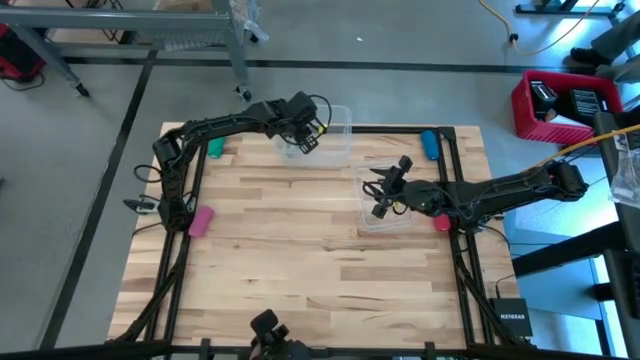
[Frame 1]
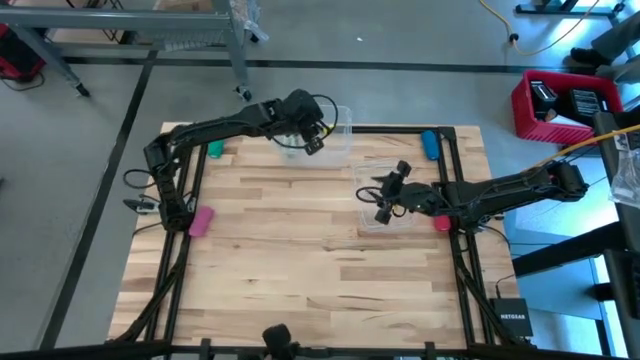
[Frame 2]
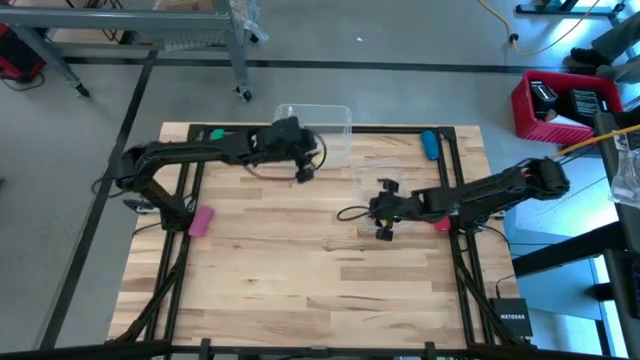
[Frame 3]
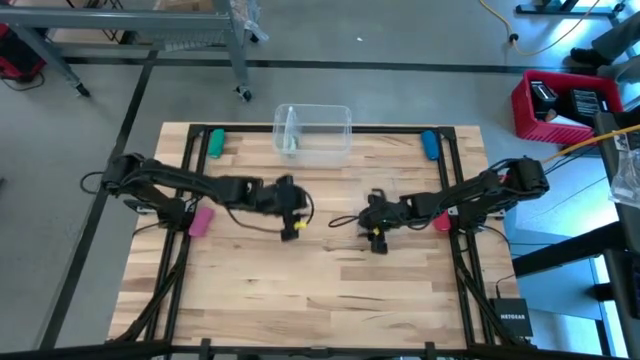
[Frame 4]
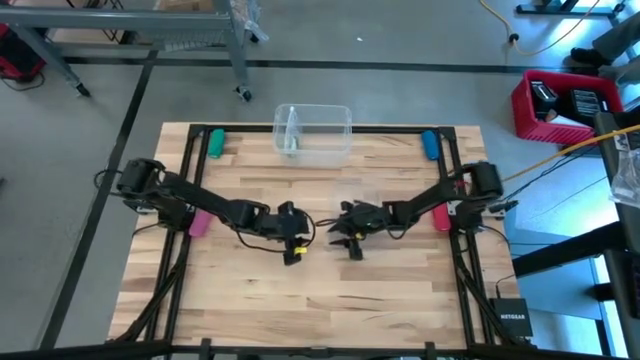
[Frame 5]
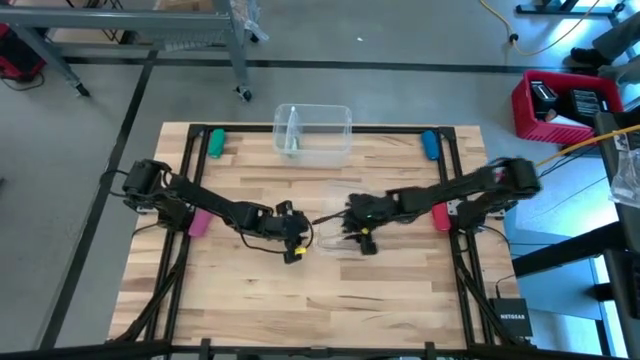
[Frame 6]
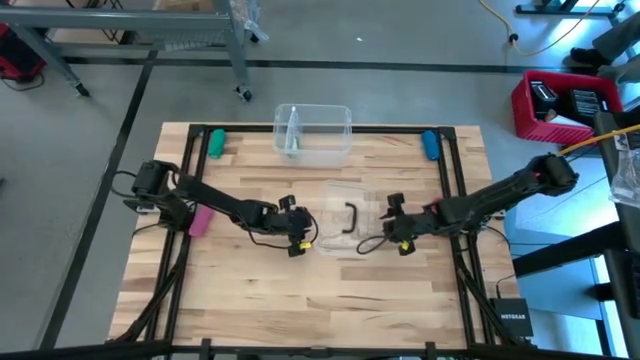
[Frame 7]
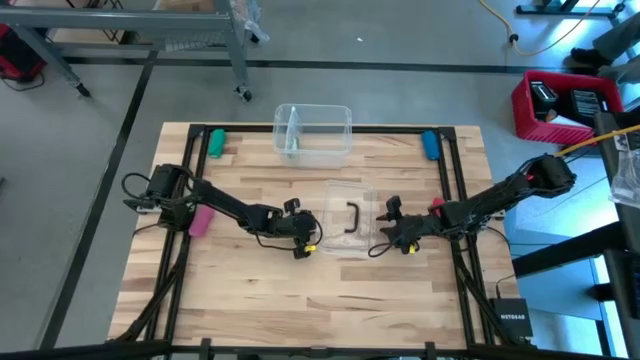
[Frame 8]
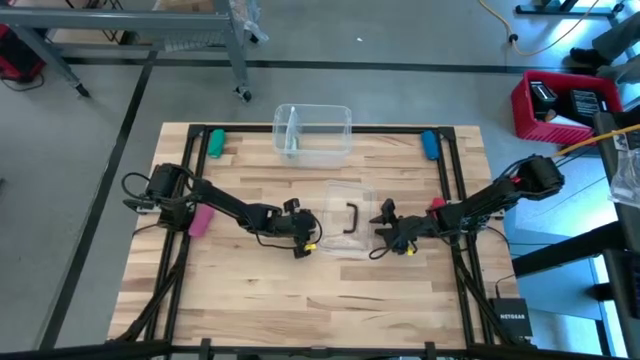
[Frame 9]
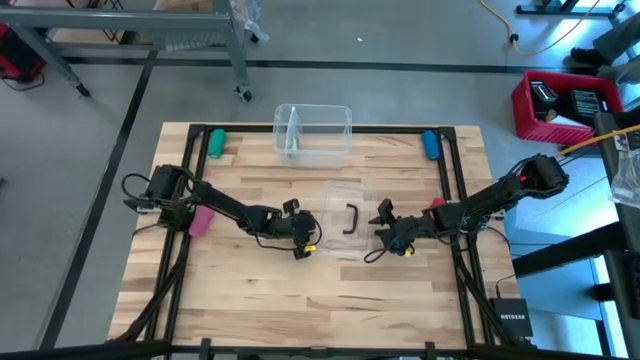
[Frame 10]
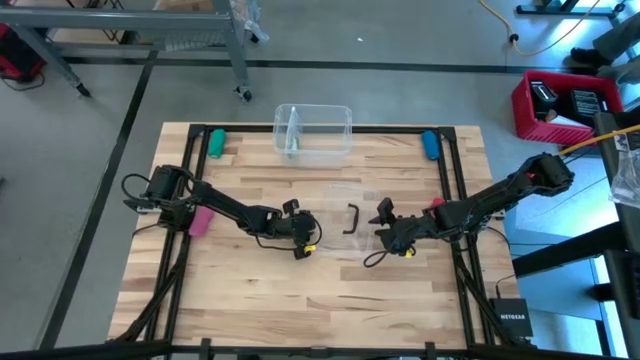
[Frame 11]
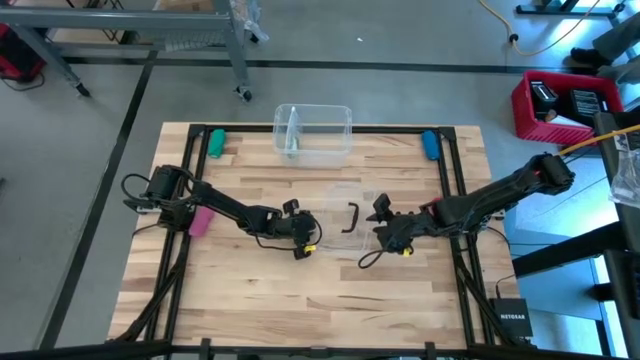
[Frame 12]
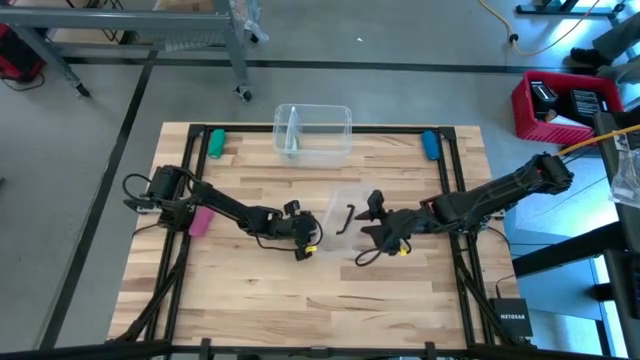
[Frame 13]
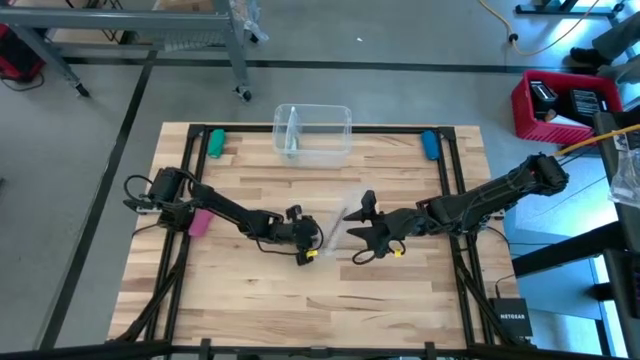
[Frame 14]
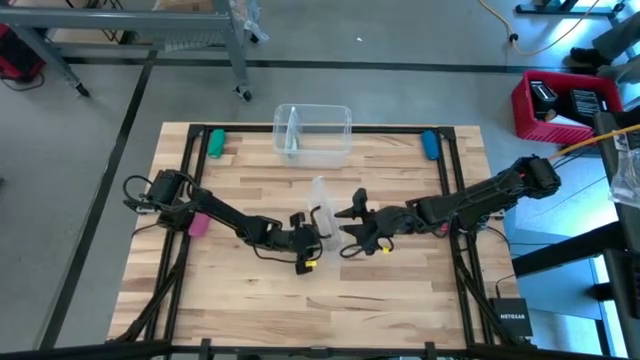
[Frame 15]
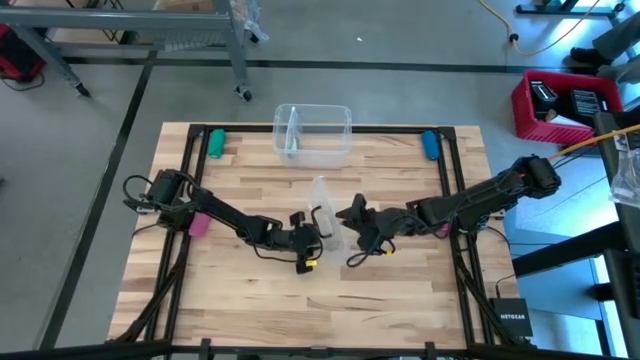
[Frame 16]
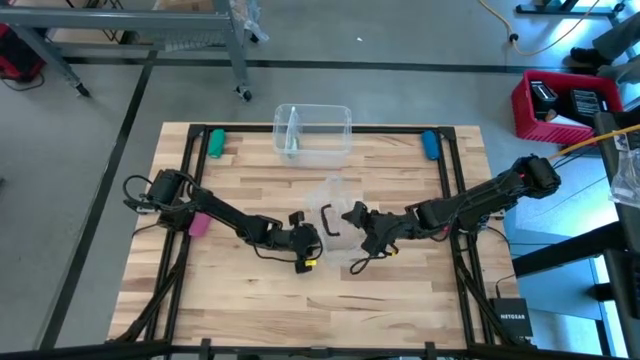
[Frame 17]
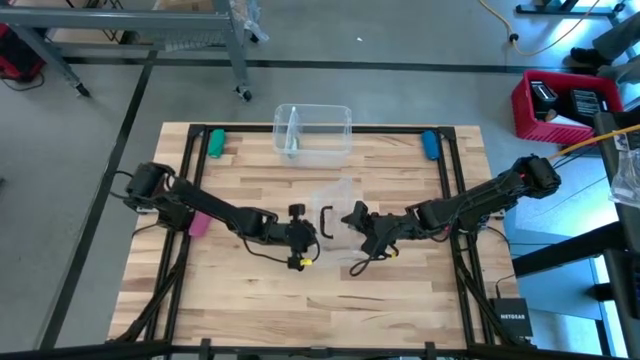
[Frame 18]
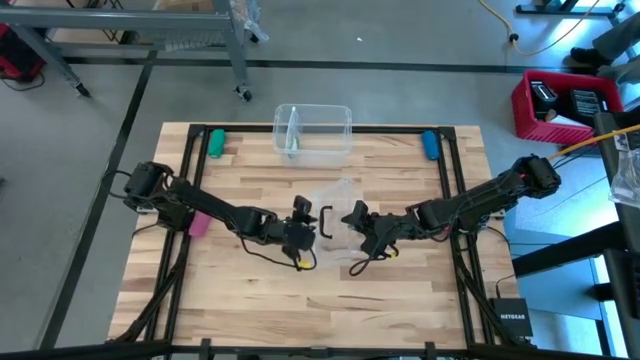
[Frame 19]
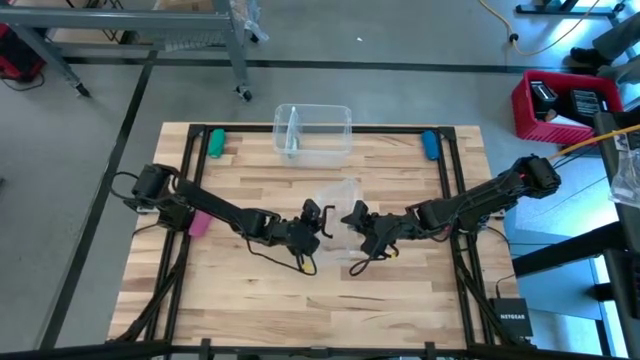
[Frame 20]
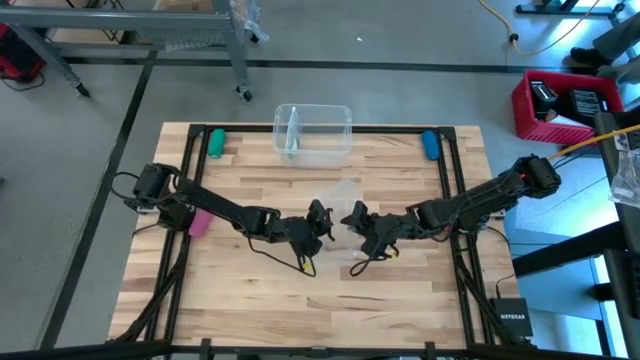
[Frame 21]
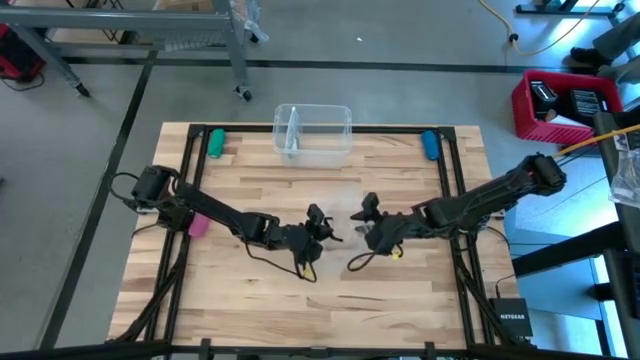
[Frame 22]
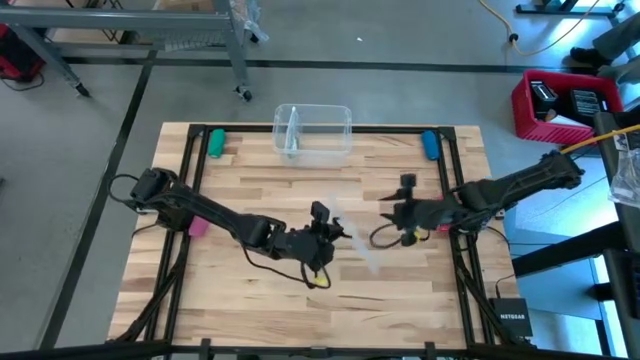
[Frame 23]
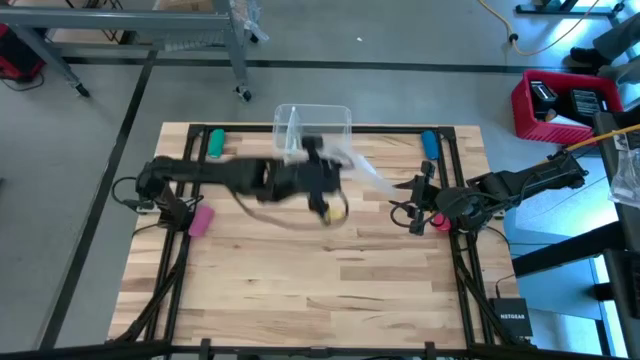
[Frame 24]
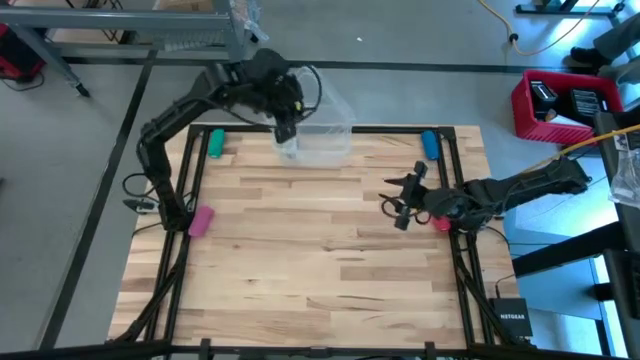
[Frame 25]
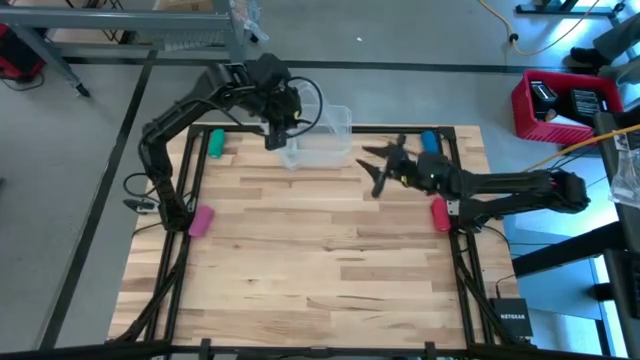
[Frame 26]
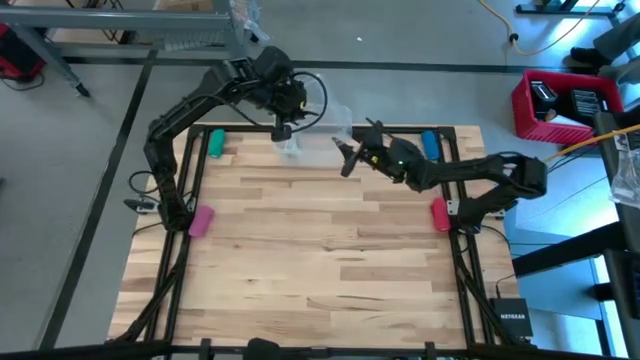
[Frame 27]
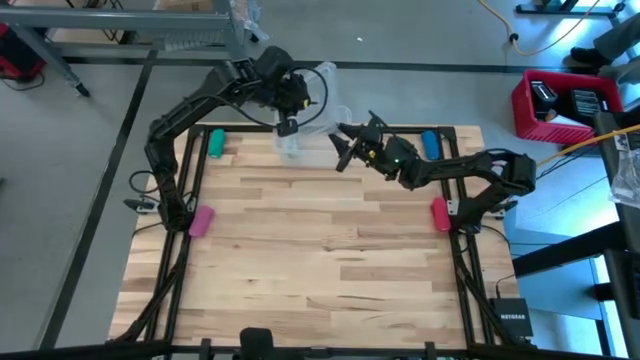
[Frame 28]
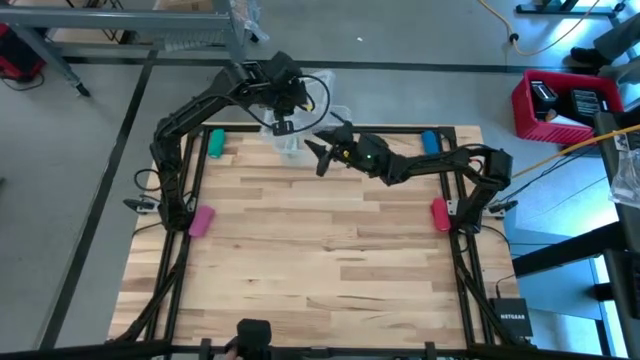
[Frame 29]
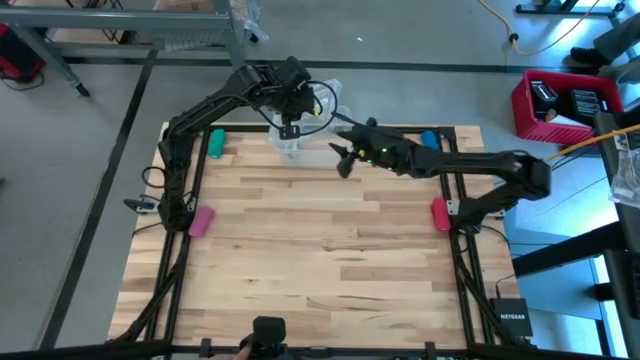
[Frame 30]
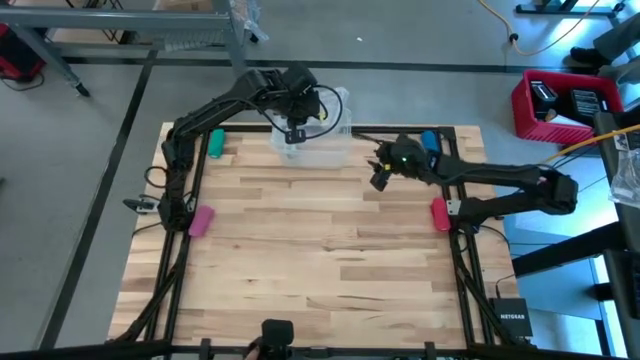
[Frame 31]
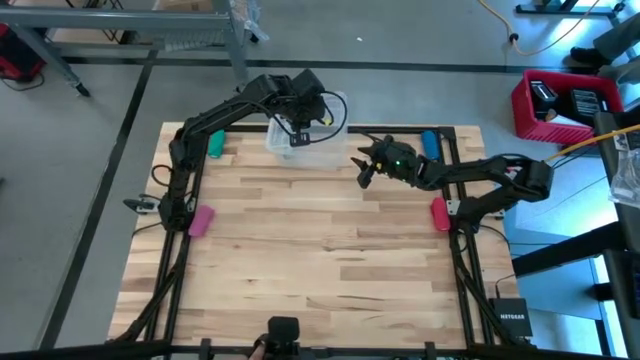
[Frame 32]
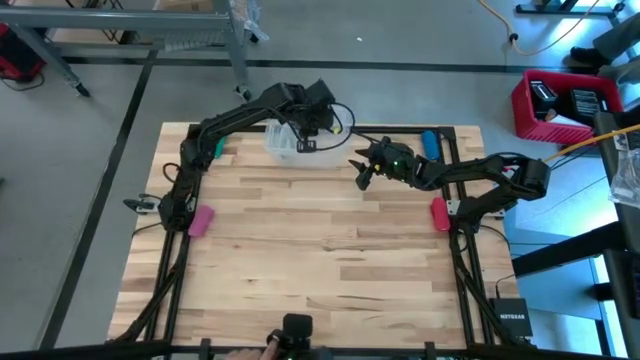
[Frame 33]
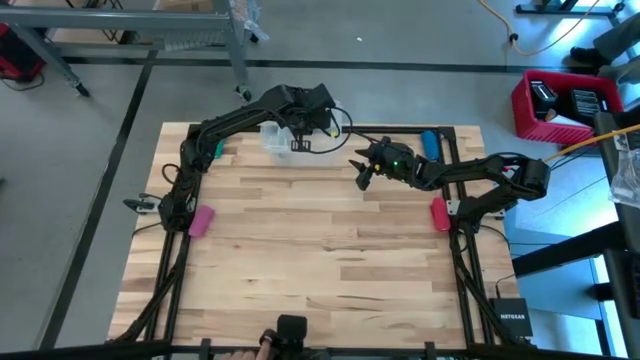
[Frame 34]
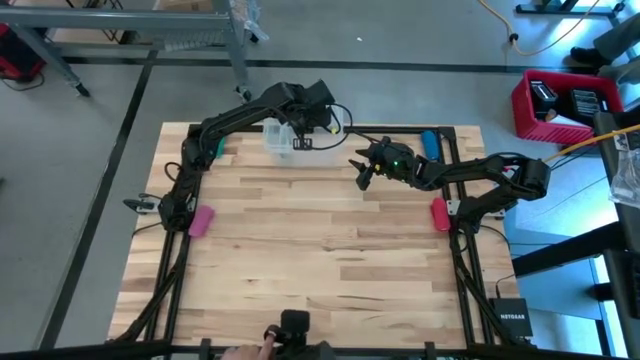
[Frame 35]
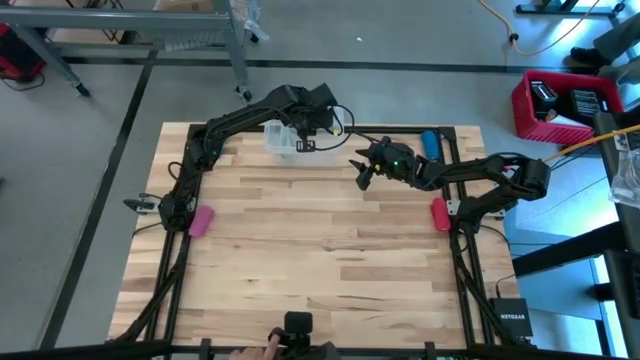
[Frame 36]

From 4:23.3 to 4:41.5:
Task: Roll bandage
Close the transparent bin

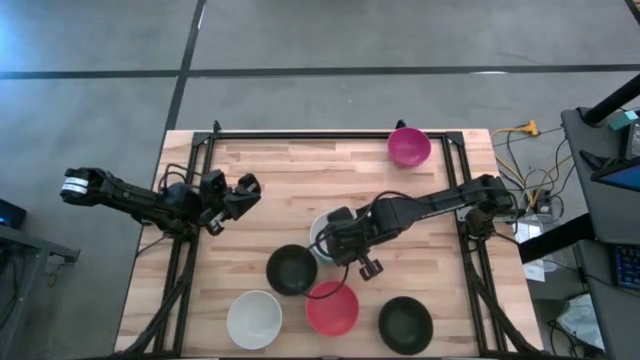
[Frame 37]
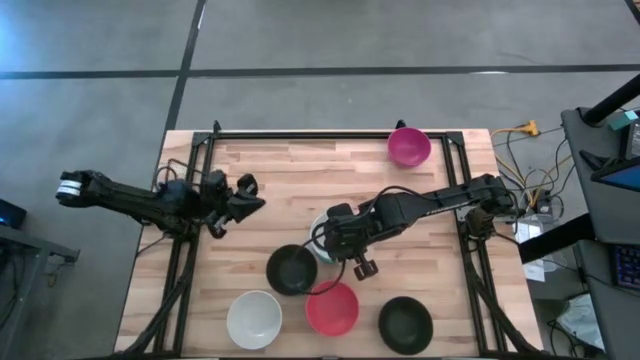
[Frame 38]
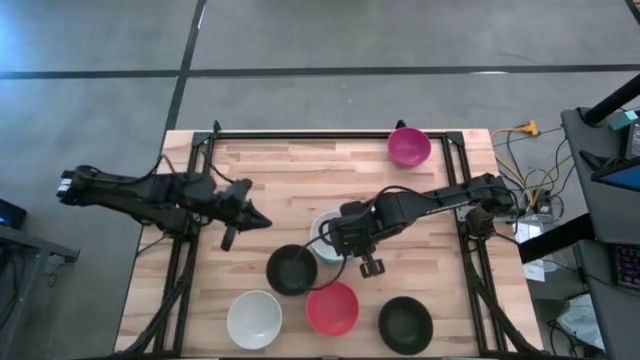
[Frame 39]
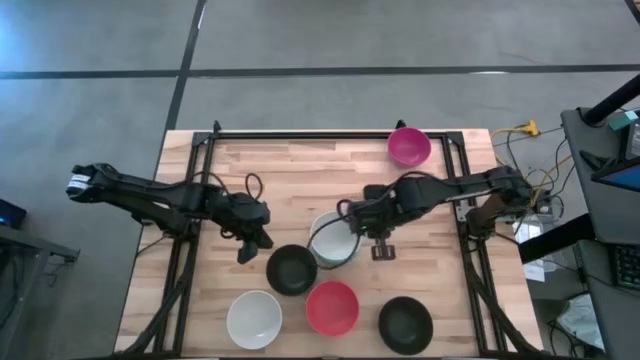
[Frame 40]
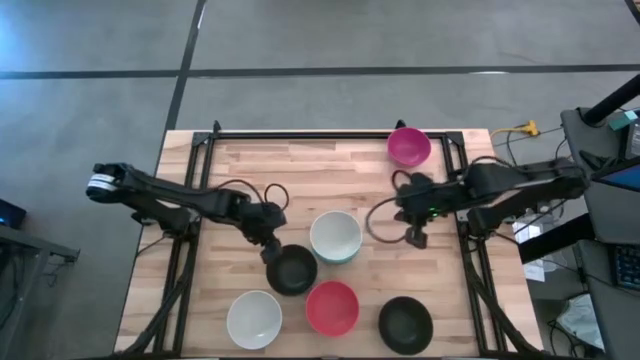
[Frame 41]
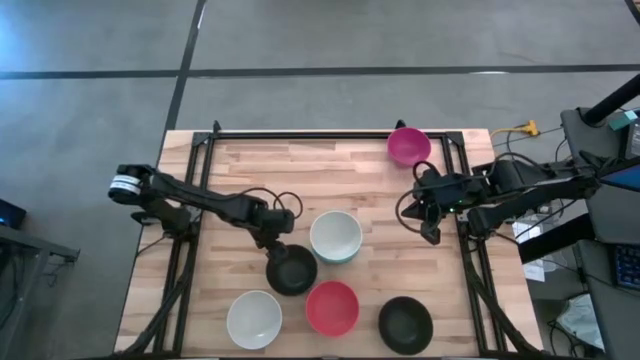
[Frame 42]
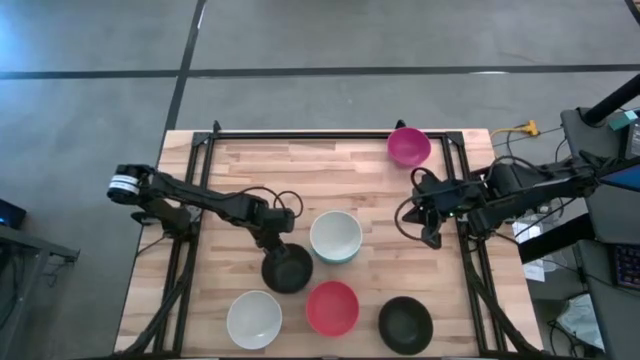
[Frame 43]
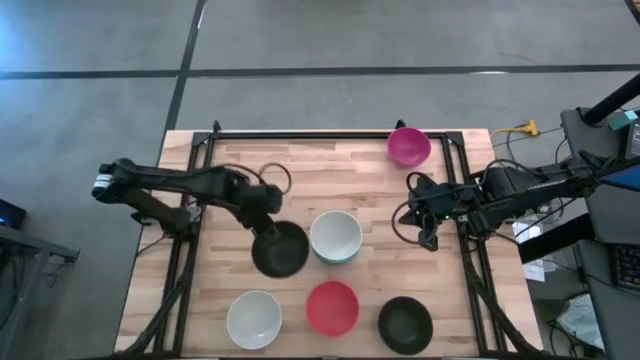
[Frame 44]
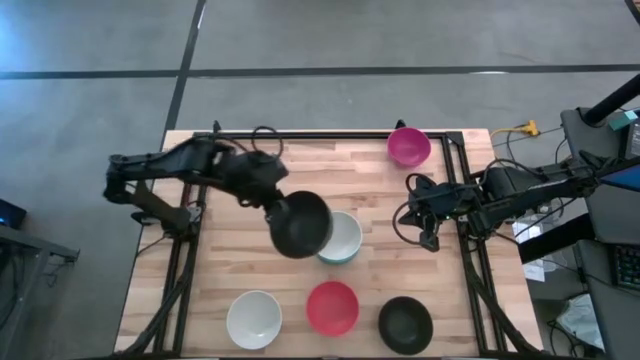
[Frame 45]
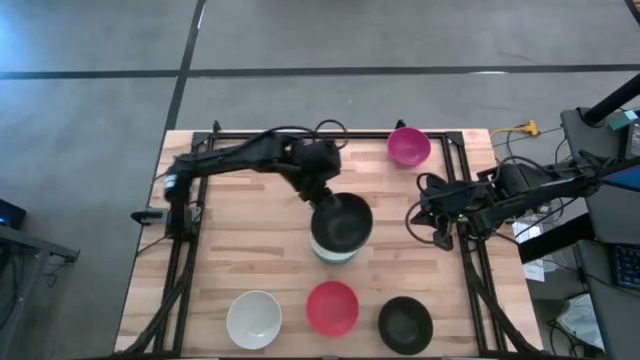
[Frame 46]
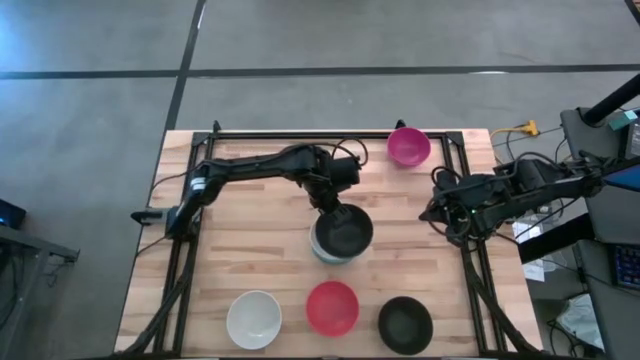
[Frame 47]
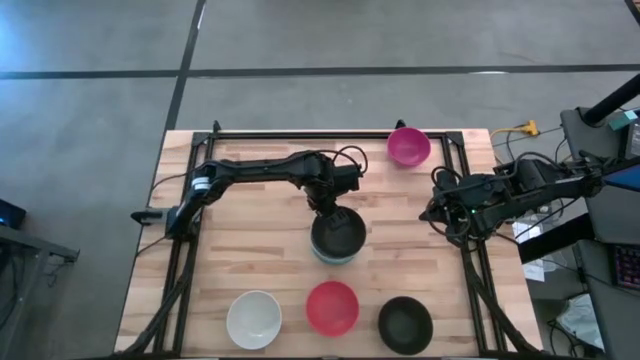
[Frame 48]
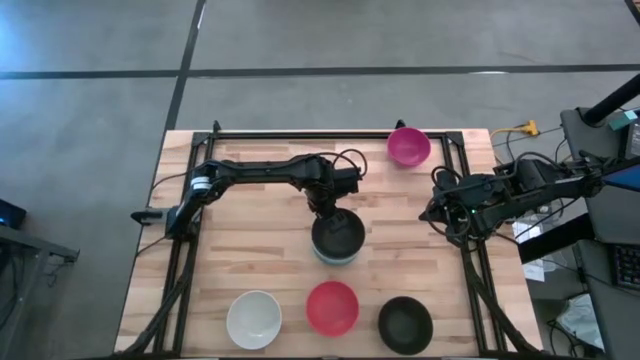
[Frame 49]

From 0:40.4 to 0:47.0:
Task: Nest bowls inside each other
Stack the top black bowl on top of the top white bowl
